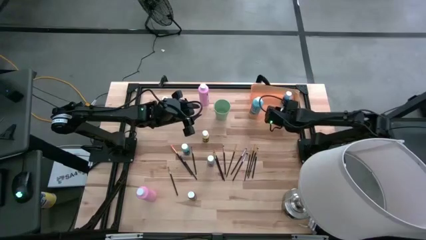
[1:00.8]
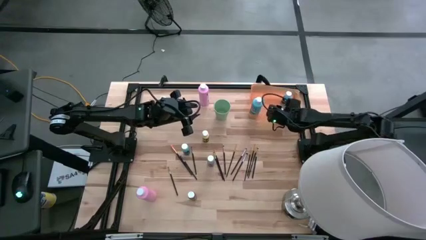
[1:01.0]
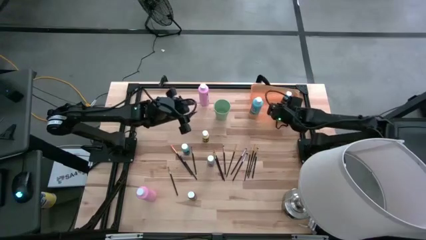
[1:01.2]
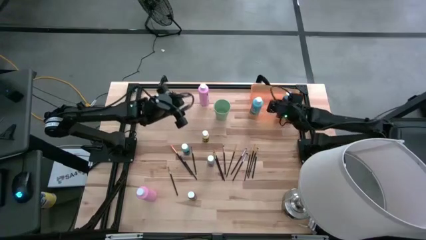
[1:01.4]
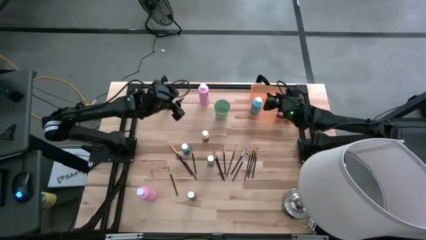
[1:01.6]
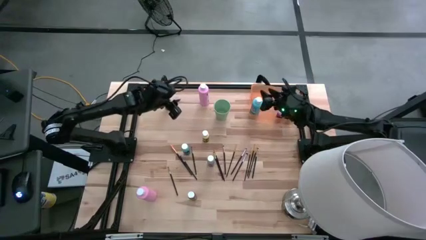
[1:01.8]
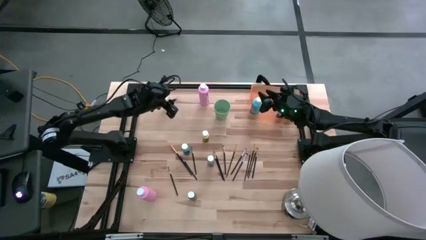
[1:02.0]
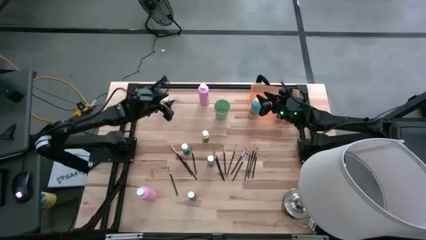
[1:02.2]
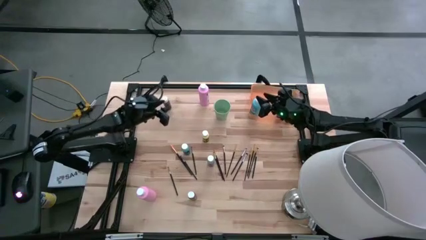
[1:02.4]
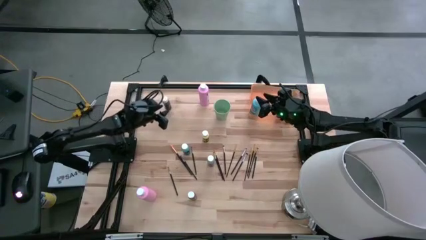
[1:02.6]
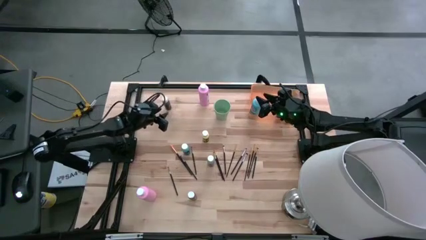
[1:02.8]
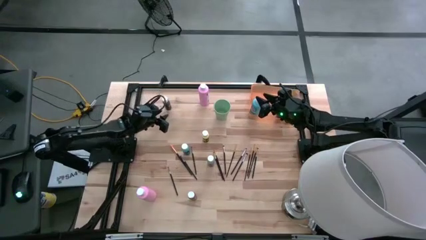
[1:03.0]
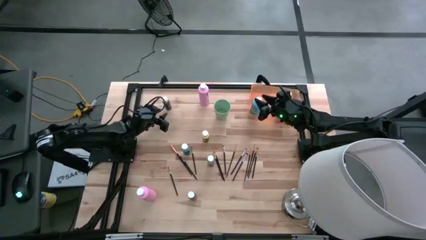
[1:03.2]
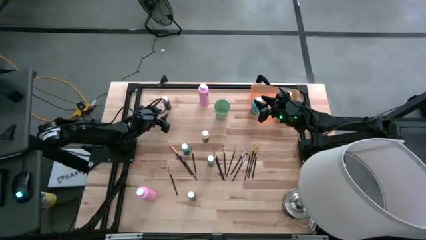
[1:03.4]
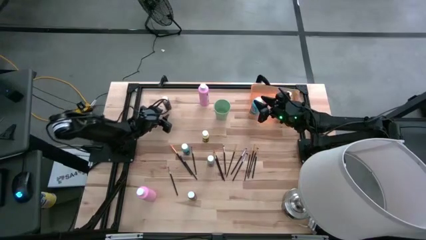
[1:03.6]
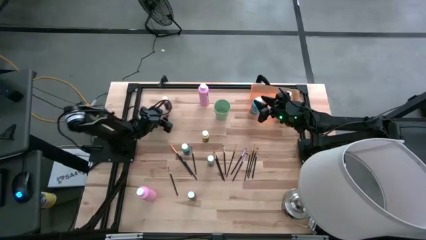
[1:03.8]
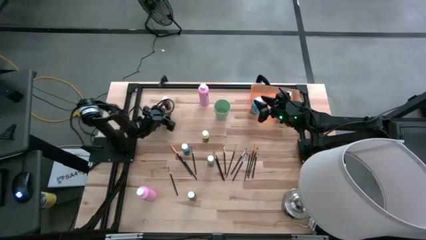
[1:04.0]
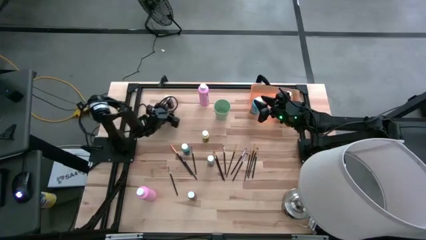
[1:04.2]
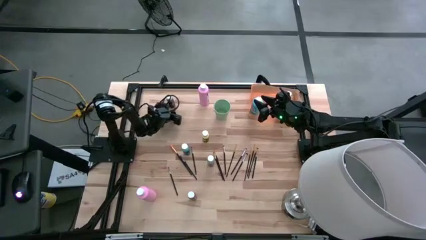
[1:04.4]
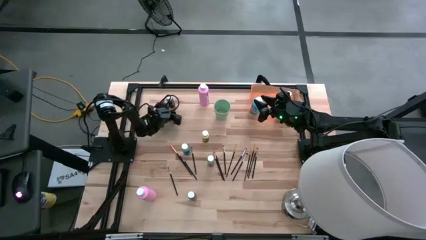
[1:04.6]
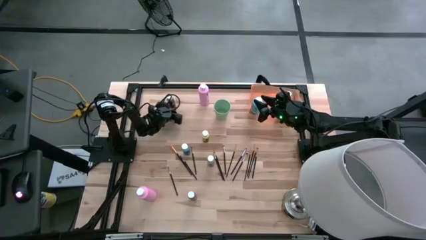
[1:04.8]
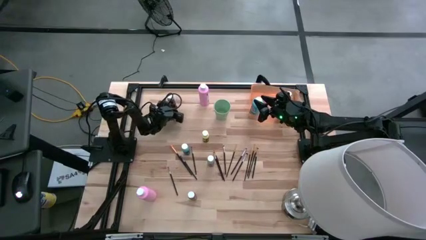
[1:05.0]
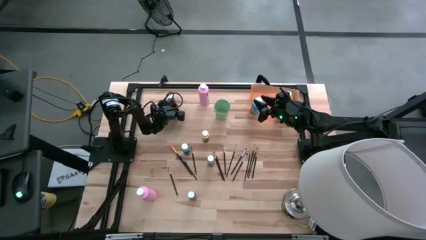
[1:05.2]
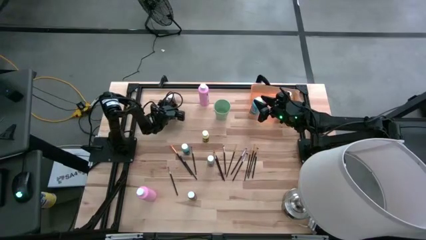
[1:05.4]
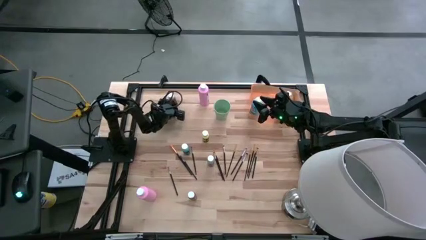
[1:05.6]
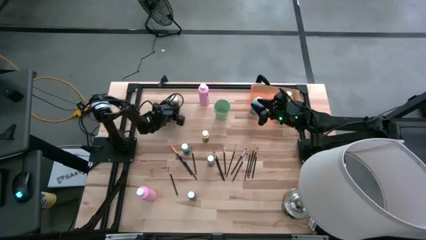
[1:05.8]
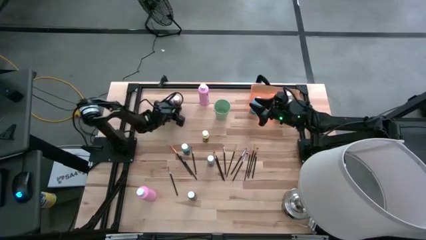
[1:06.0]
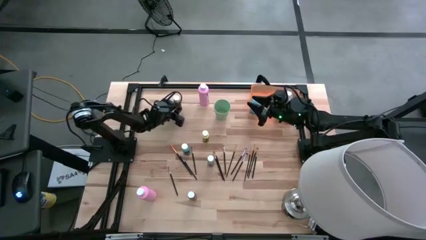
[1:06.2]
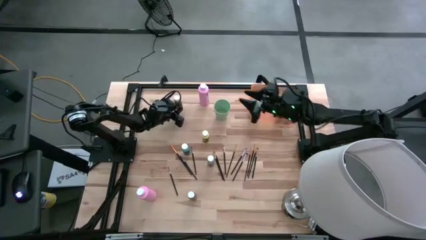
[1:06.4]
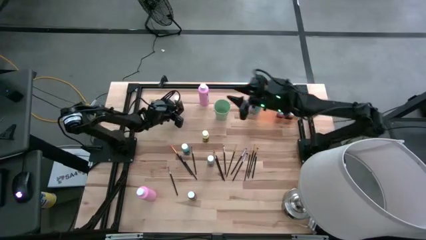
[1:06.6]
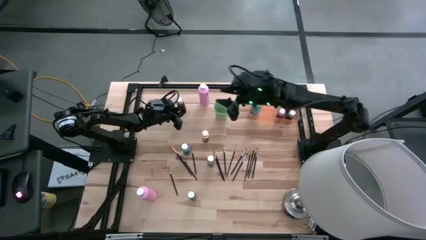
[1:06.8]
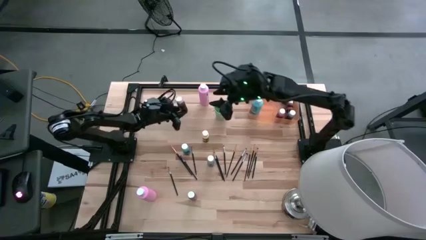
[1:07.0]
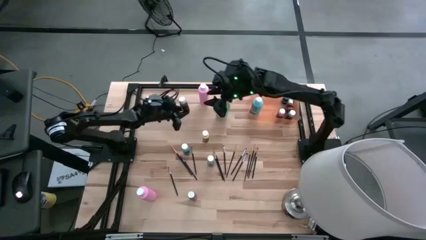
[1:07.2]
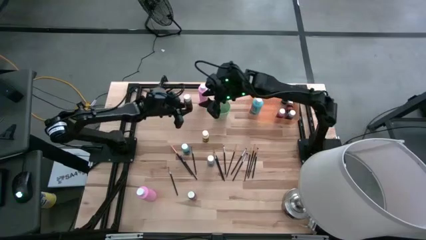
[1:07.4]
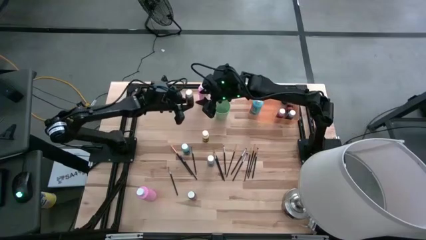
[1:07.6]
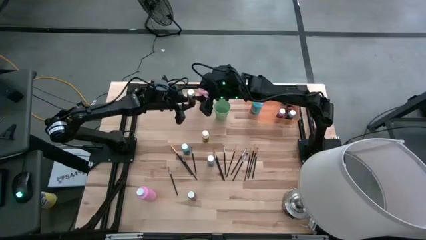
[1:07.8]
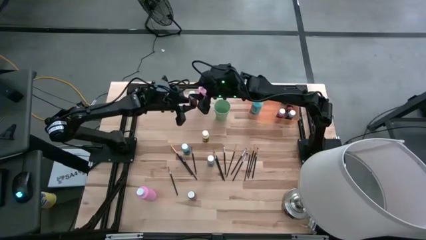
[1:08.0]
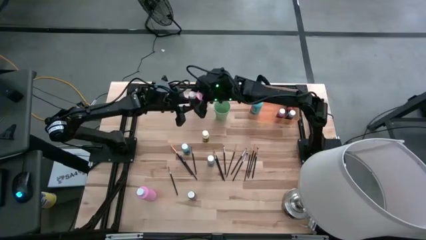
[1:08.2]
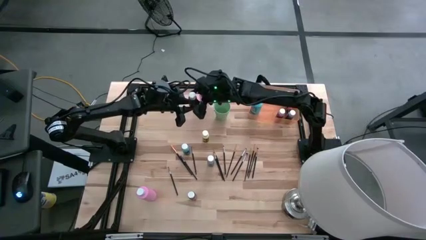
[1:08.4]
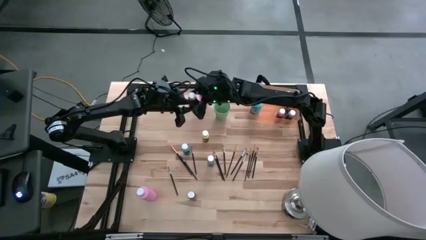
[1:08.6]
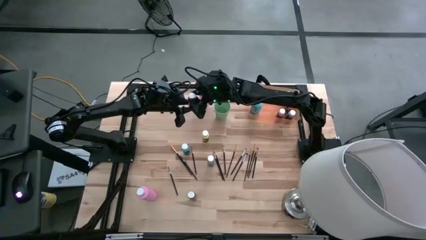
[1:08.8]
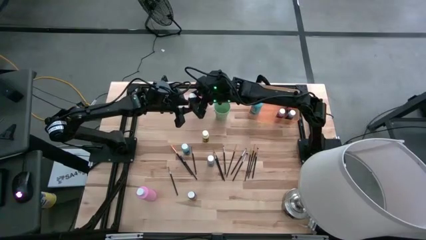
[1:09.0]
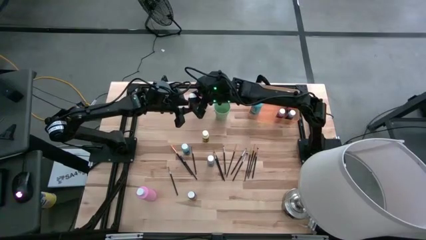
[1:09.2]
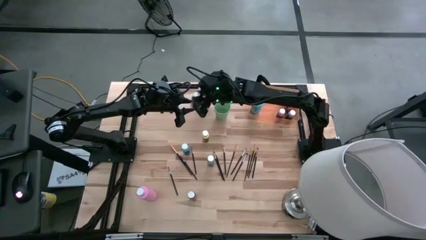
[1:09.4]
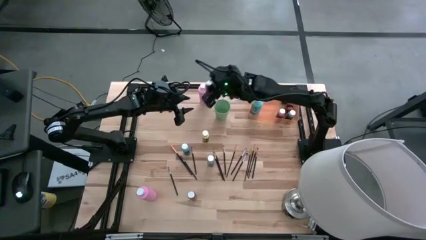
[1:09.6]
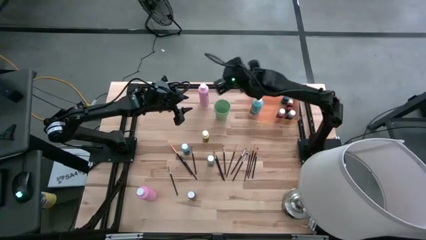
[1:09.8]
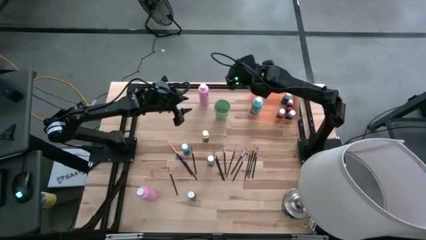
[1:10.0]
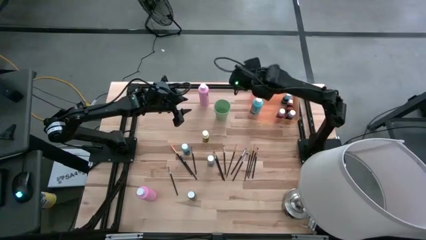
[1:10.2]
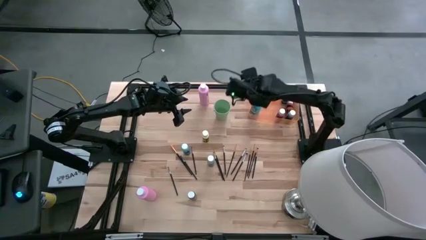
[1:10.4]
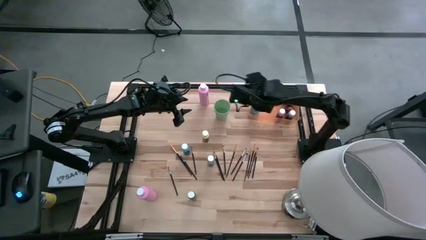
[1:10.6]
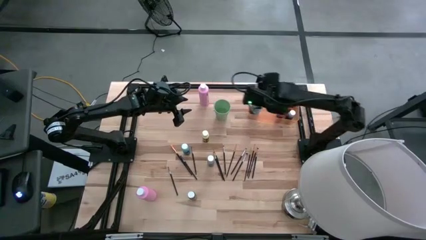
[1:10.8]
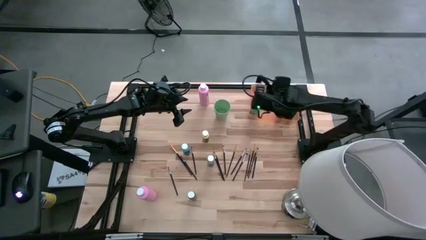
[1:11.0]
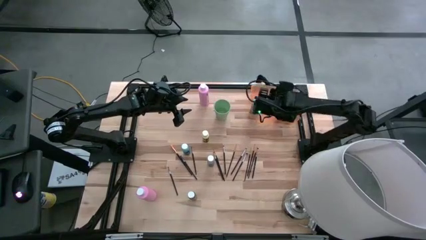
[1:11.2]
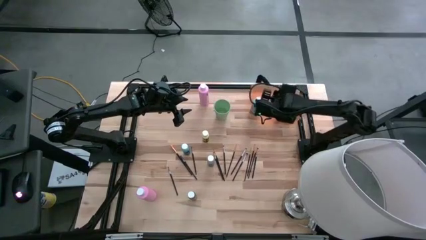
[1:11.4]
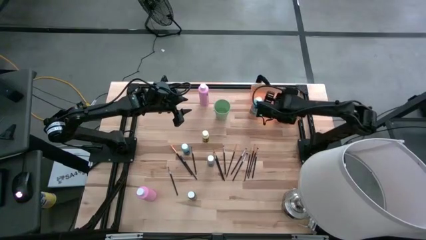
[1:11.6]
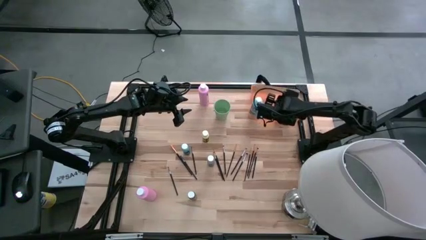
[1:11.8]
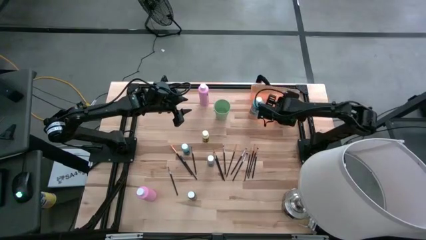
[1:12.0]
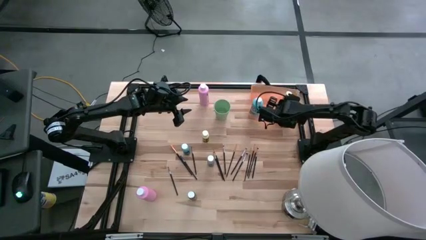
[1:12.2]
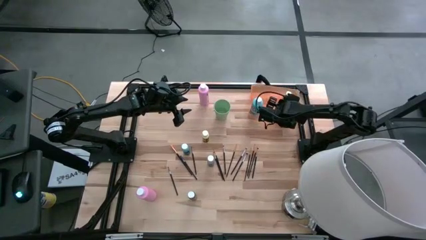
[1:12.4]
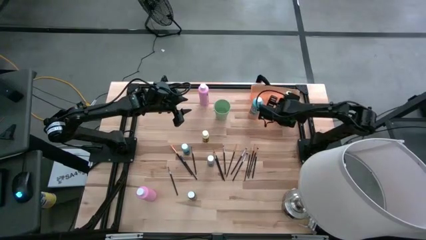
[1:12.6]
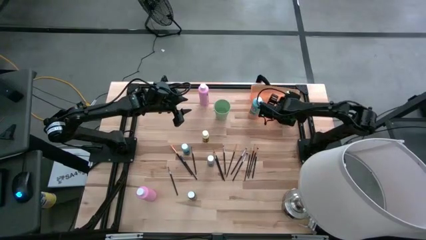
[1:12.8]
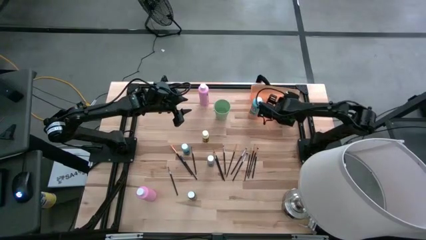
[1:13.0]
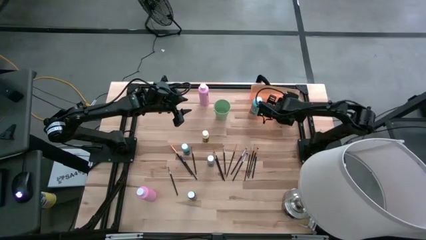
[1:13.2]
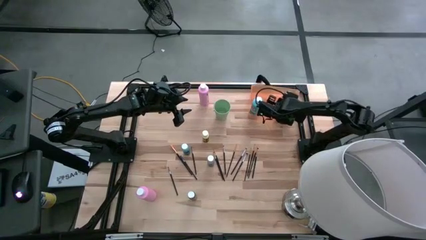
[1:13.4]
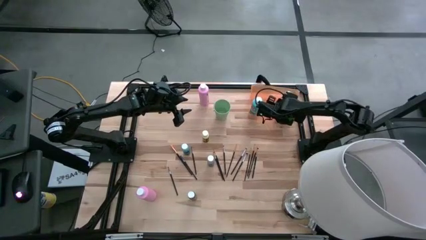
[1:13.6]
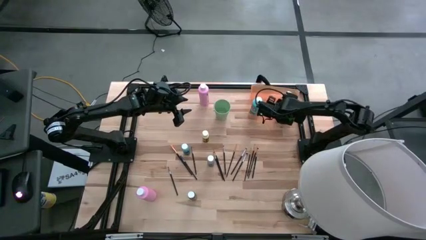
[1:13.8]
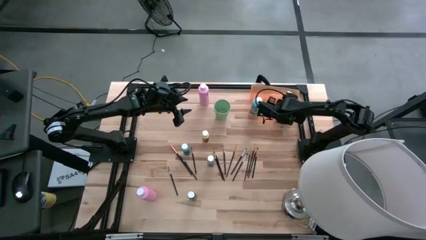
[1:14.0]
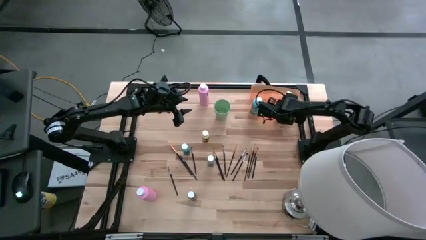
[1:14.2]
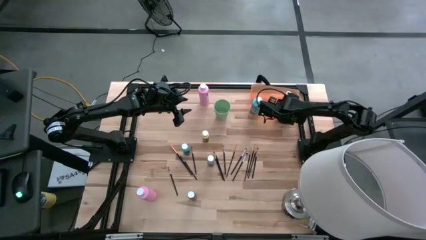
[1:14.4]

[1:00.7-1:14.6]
Task: Pick & Place Paint Supplies
Put the top small brown paint bottle into the orange bin
